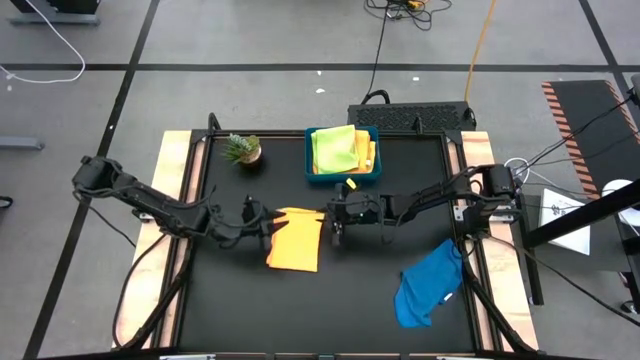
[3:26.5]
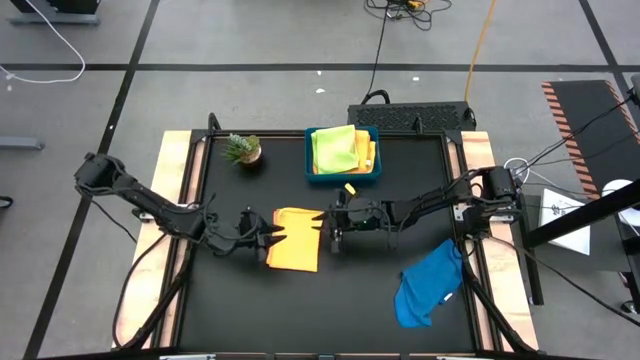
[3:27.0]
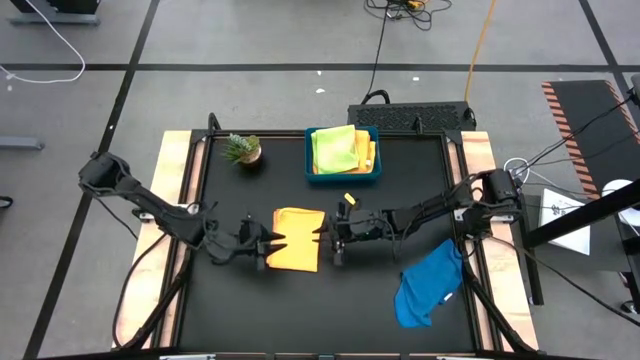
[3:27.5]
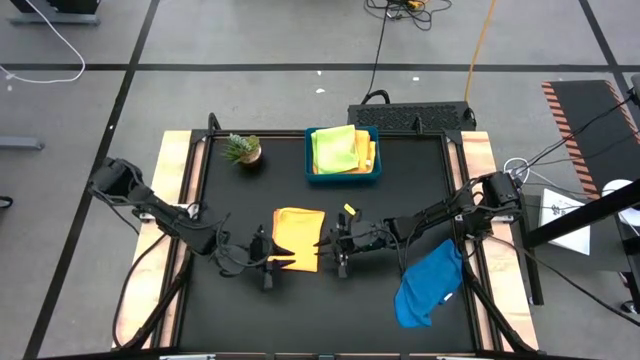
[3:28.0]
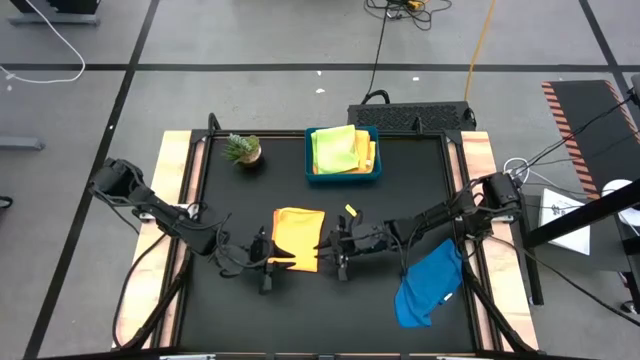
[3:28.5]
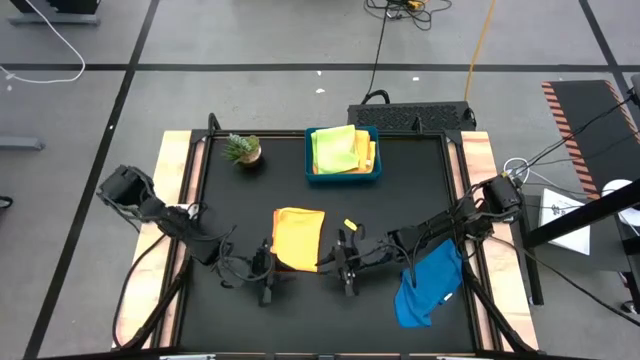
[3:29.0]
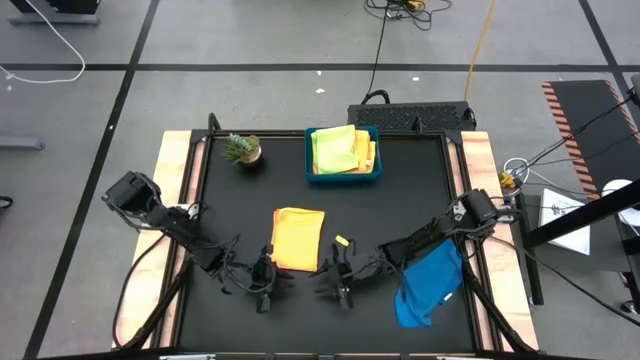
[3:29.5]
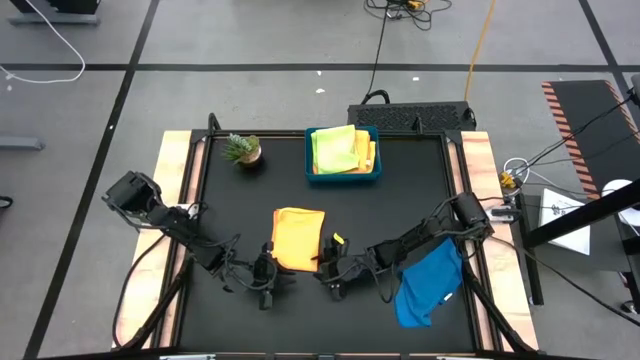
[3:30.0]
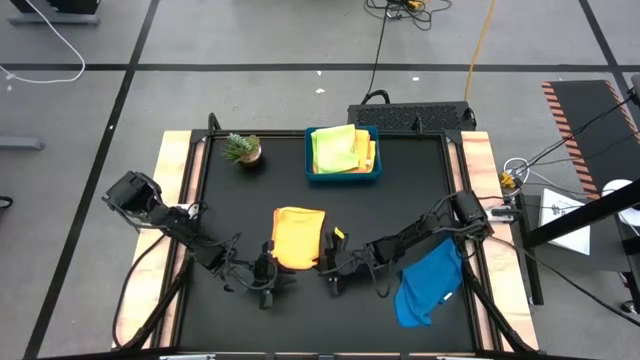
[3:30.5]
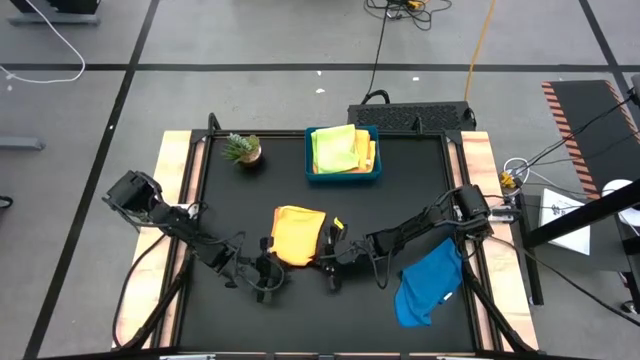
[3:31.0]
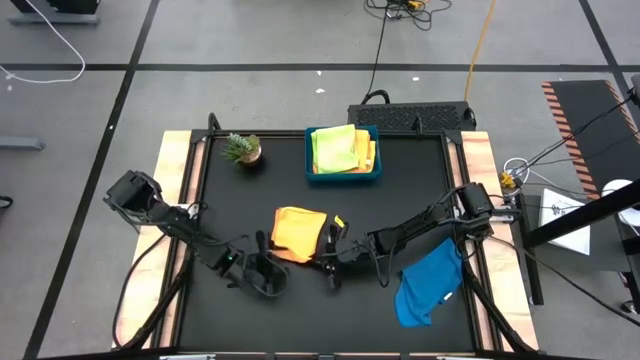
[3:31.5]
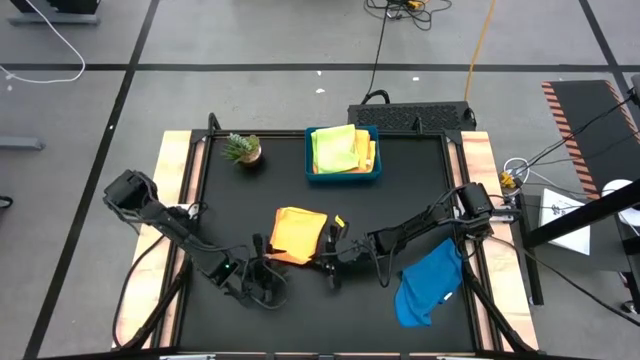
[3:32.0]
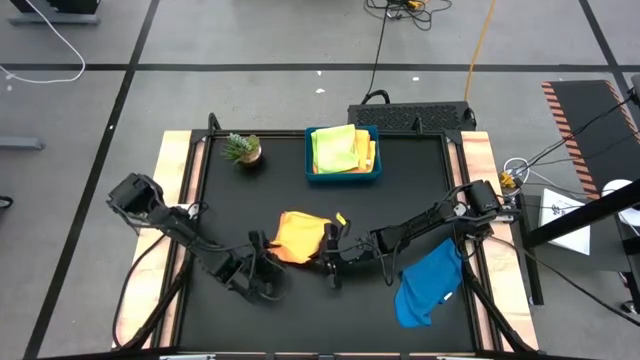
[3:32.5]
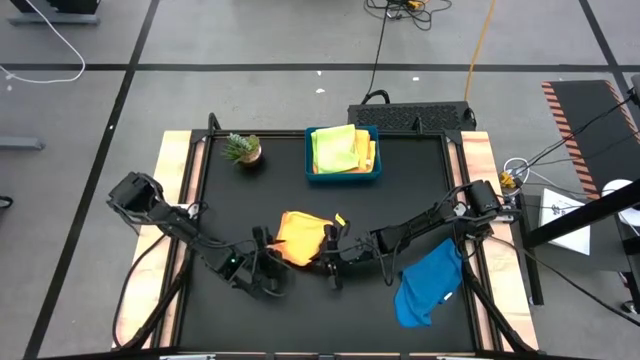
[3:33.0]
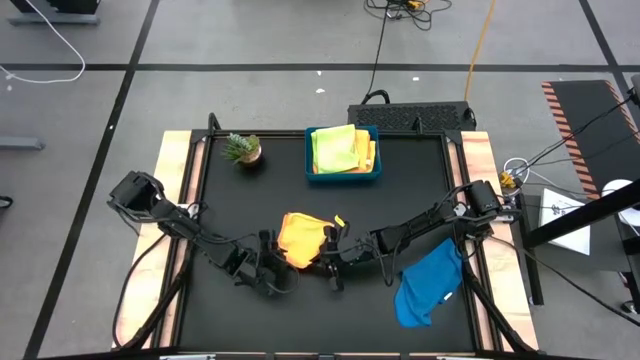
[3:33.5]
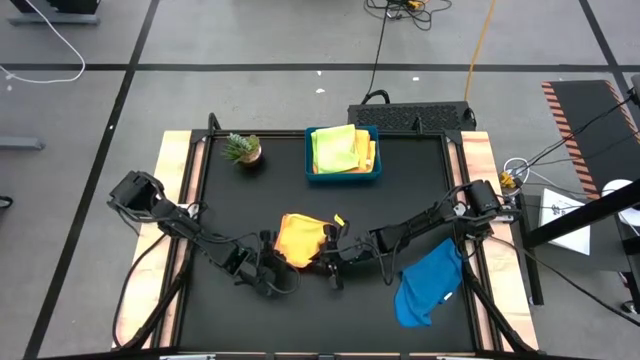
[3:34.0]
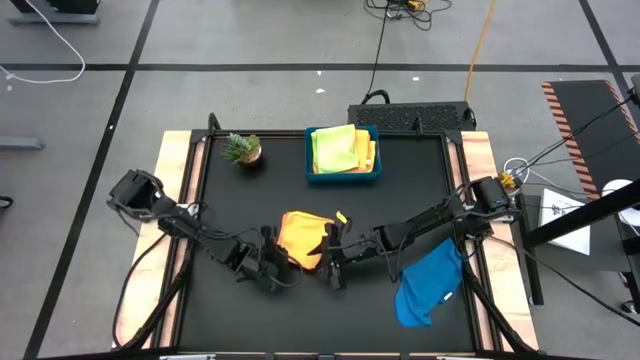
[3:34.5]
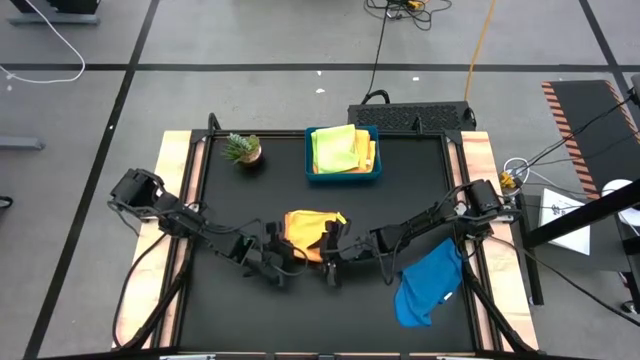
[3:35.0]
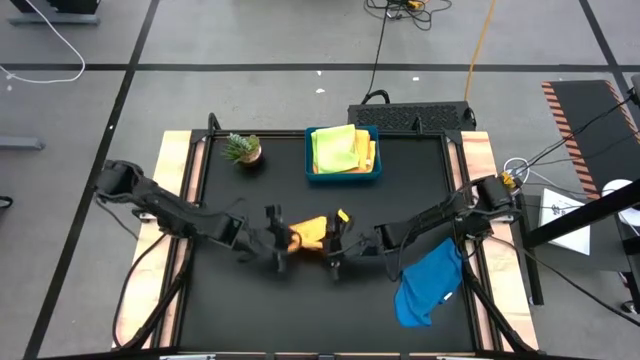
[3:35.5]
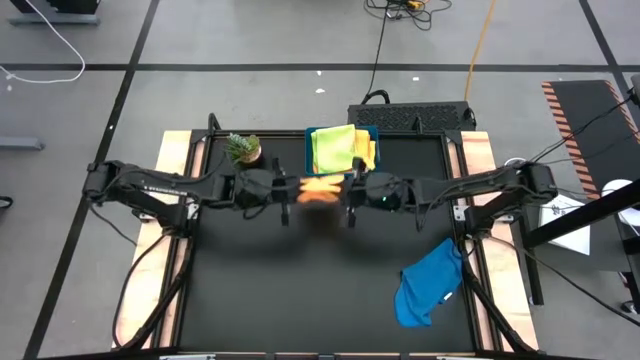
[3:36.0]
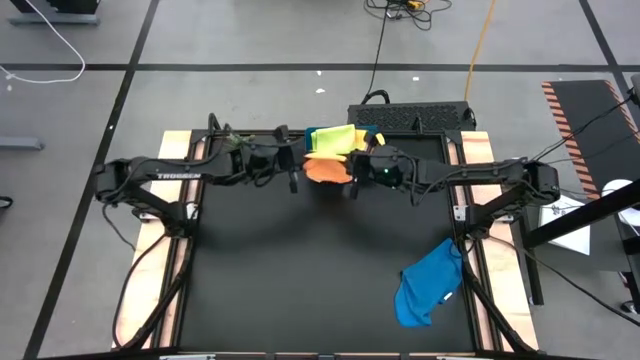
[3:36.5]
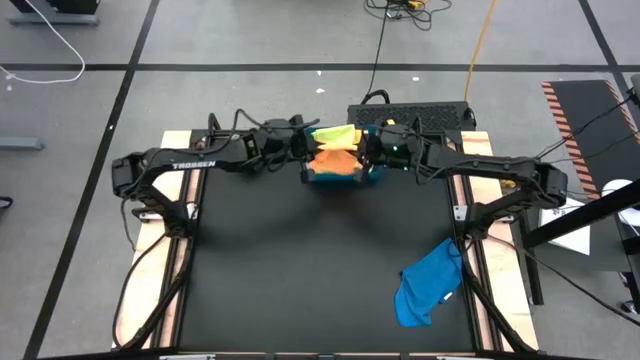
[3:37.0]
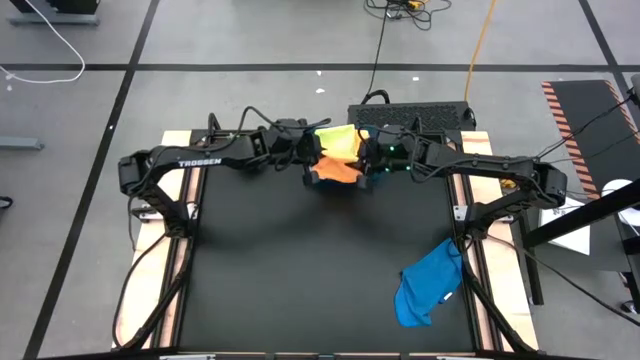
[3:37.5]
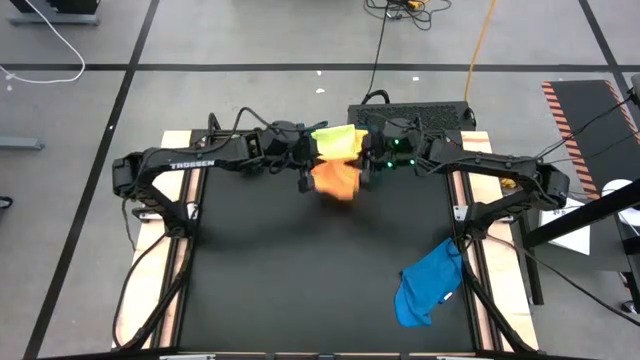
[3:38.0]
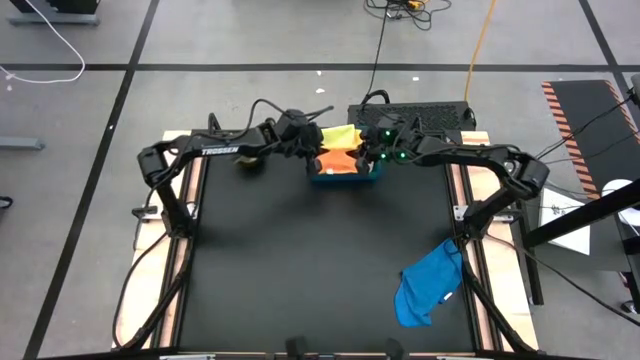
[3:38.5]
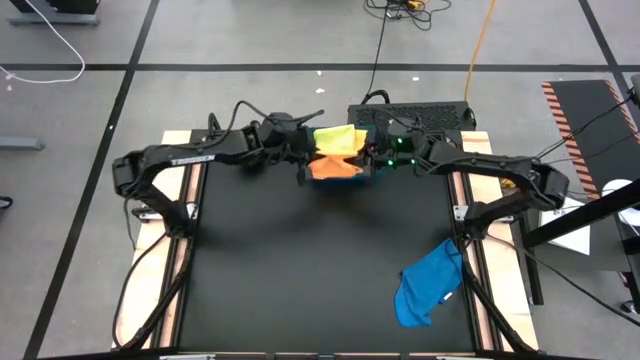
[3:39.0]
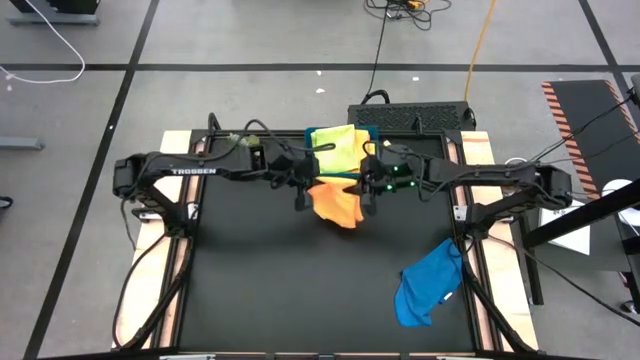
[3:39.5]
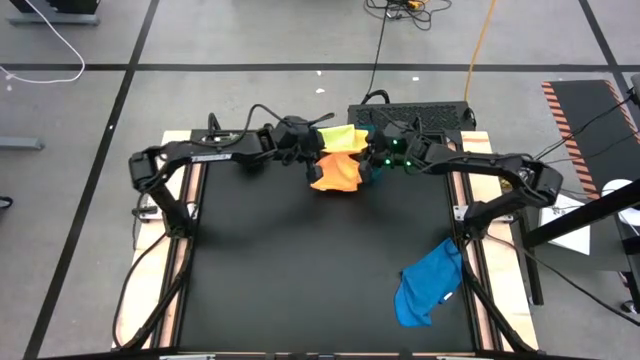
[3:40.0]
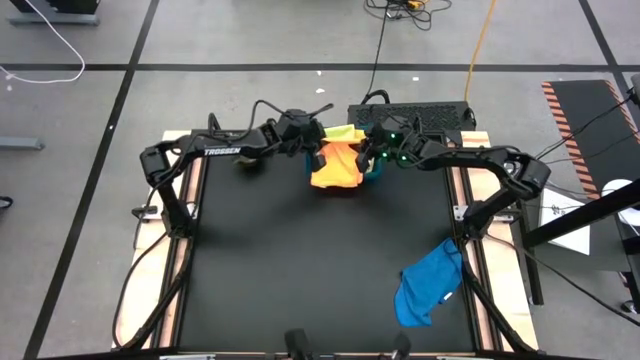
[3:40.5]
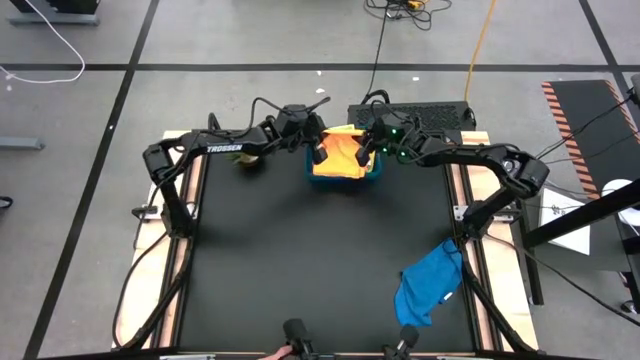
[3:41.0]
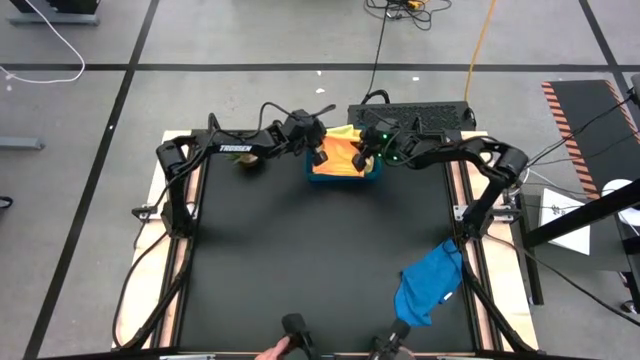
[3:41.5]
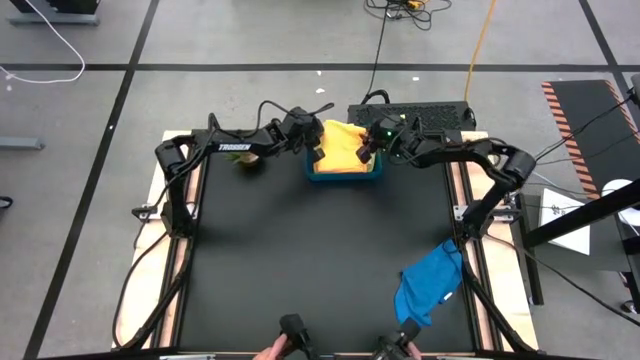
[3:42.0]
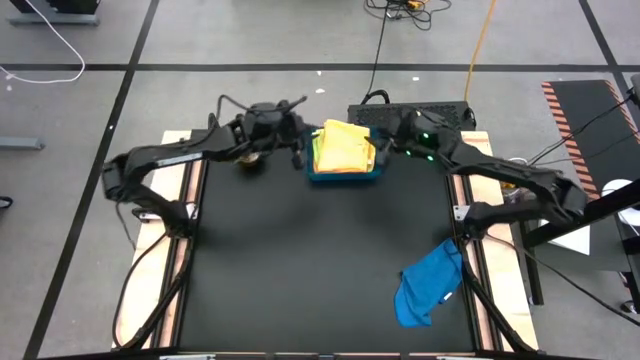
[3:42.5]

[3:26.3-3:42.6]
Task: Fold microfiber towels
Stack the orange microfiber cloth on top of the green microfiber cloth into the blue bin

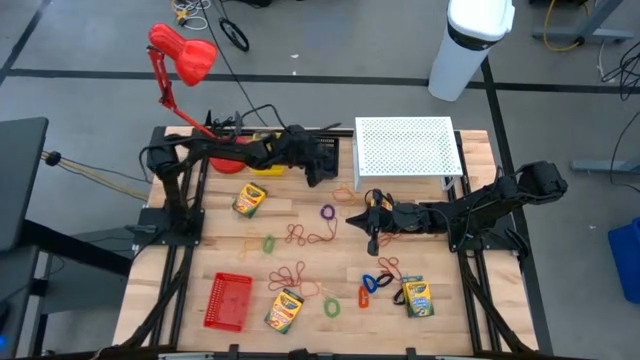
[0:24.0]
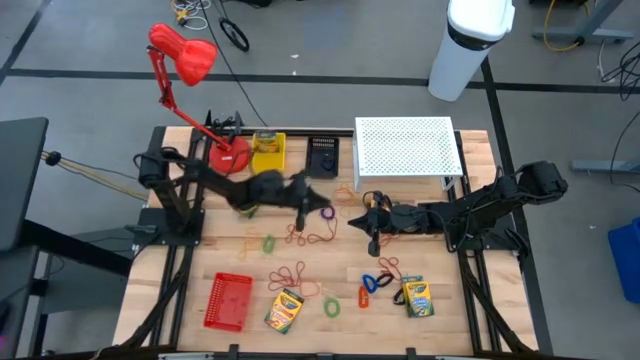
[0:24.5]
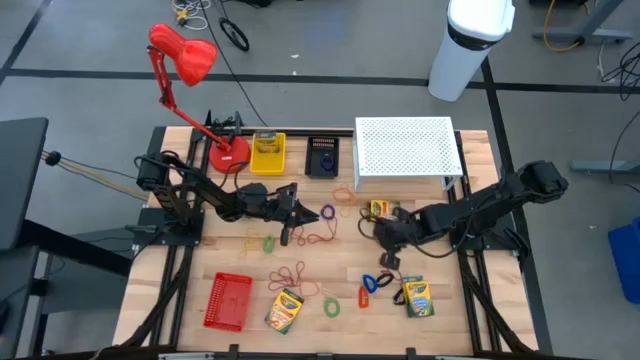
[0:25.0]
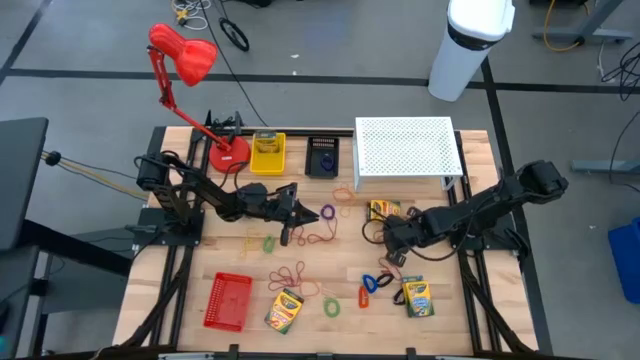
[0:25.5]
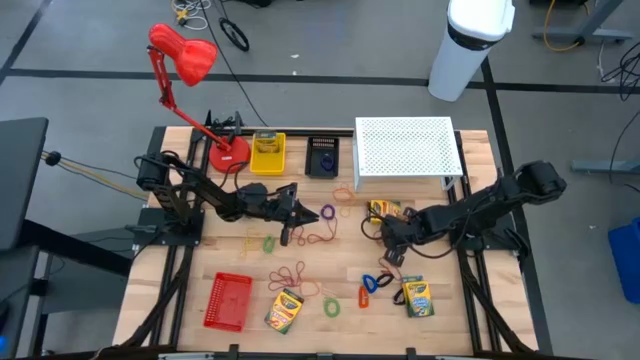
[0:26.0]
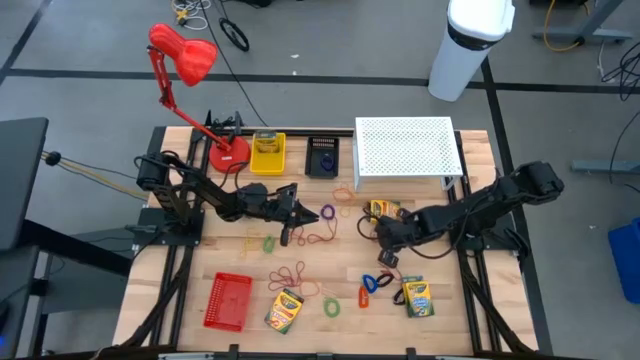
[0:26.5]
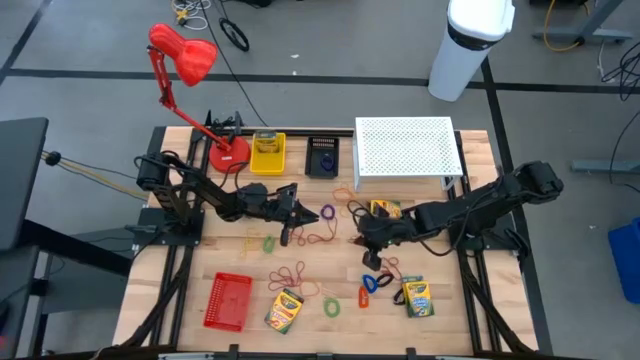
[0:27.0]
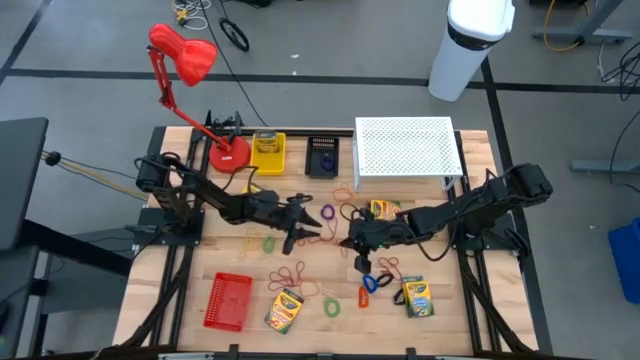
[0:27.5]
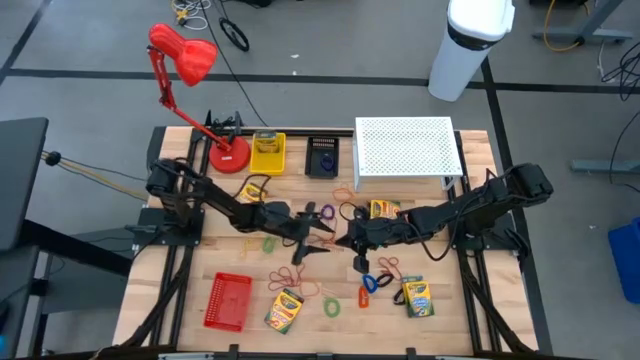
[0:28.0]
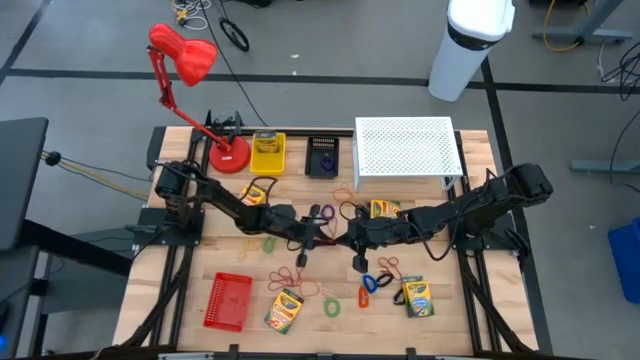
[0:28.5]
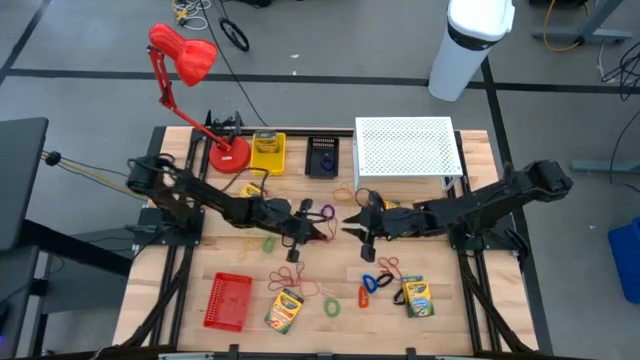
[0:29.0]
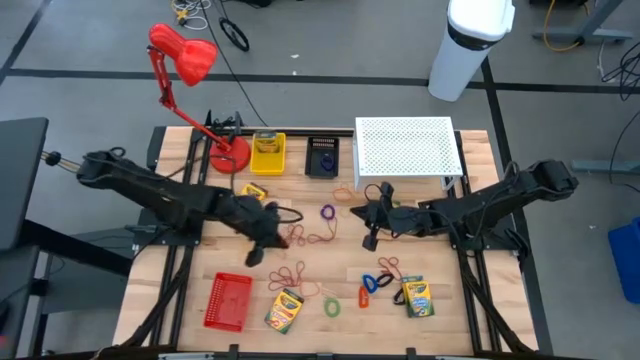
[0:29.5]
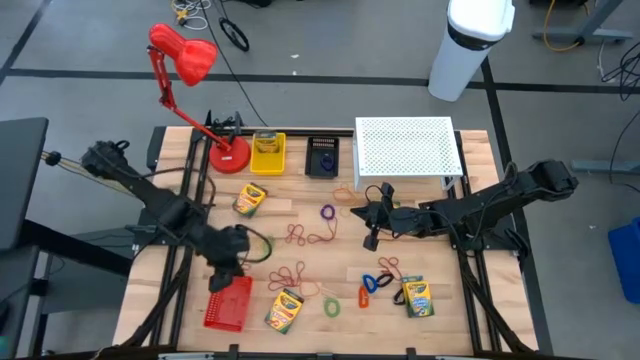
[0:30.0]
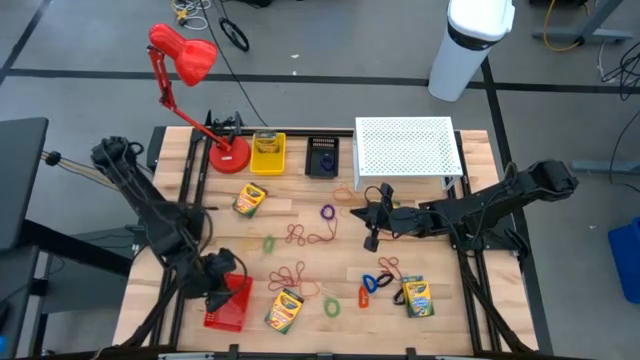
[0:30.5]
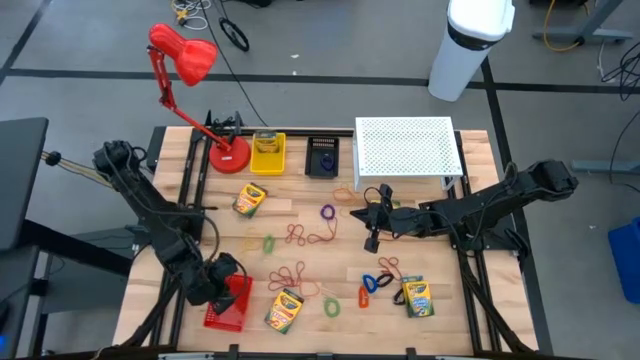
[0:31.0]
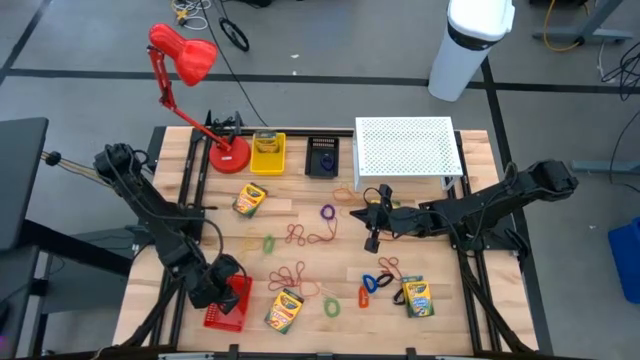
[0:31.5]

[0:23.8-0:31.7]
Task: Pick & Place Office Desk Supplies
Put the red rubber band into the red bin
